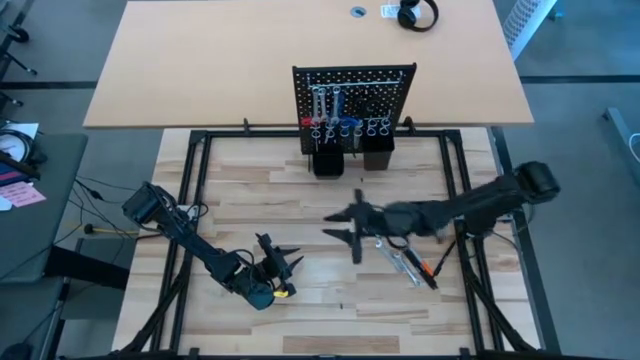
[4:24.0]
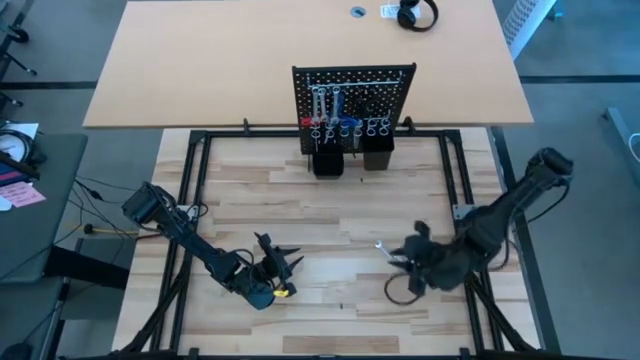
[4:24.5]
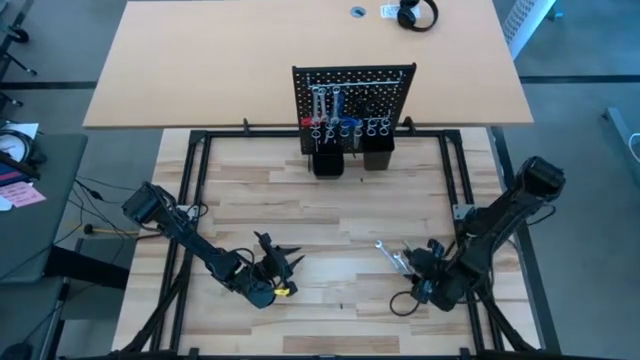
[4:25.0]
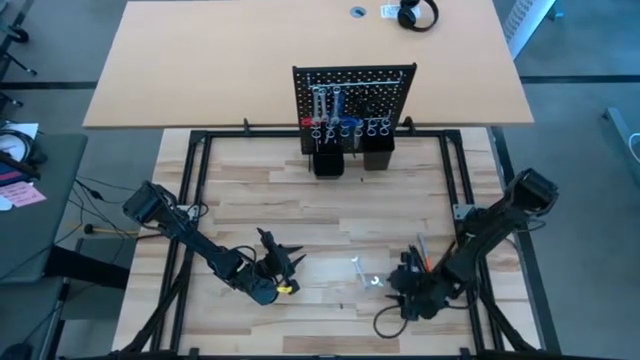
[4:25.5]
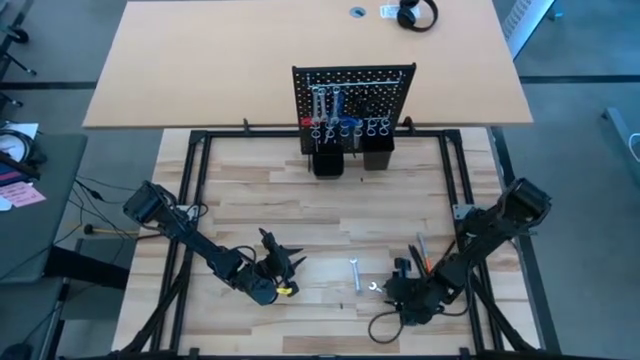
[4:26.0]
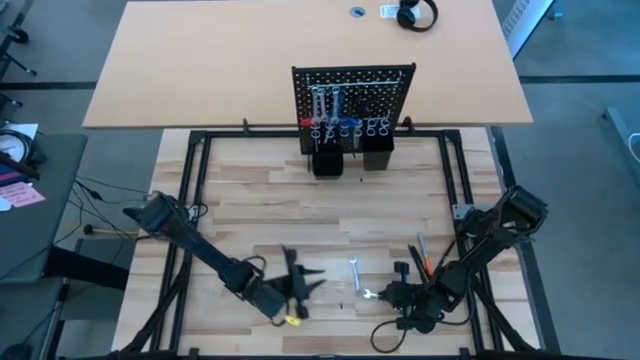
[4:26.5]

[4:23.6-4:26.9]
Task: Hang tools onto peg board
Hang the wrench on the pegboard

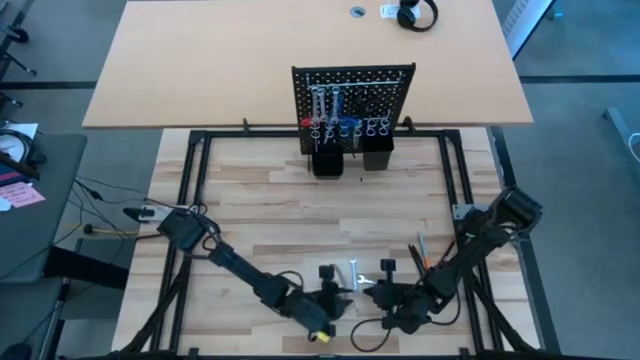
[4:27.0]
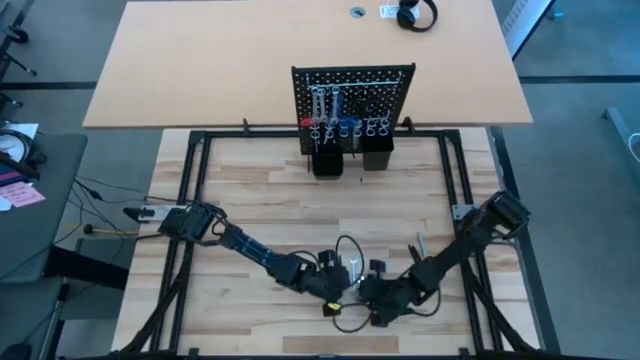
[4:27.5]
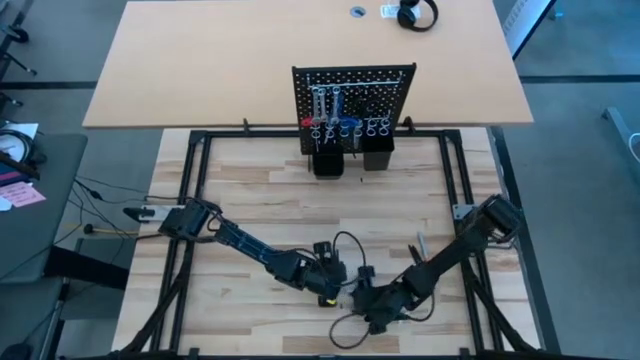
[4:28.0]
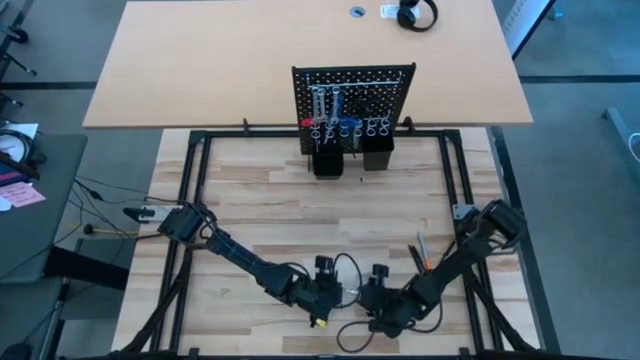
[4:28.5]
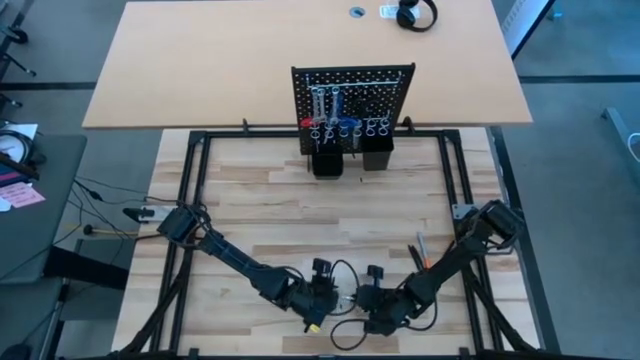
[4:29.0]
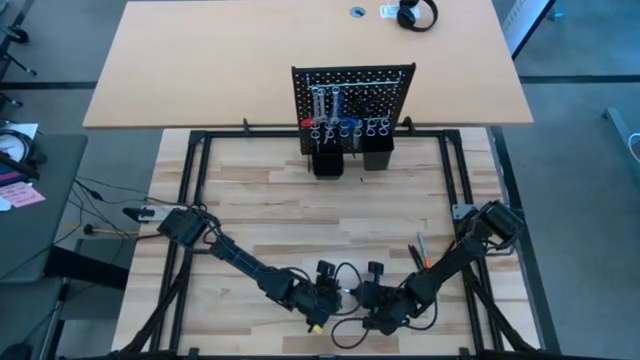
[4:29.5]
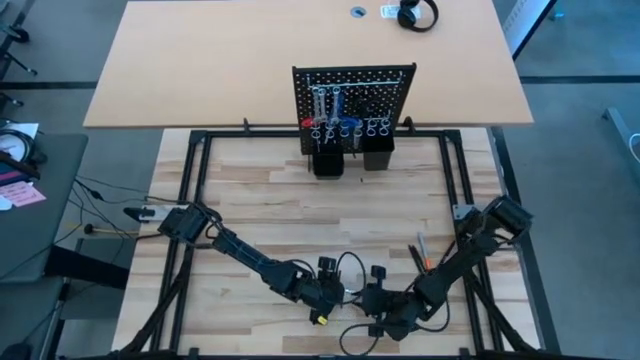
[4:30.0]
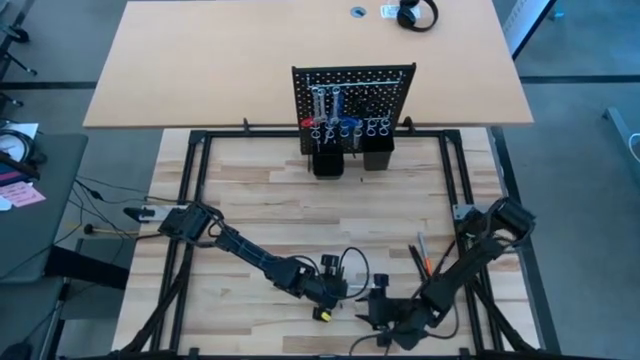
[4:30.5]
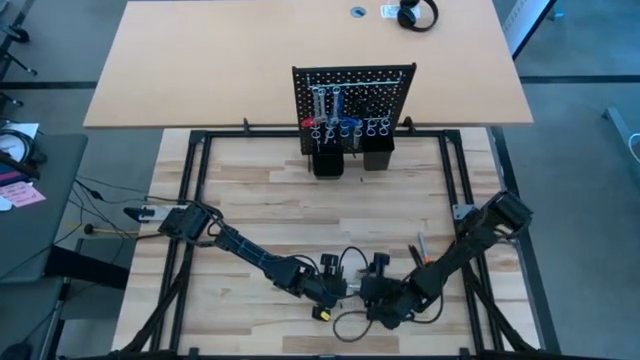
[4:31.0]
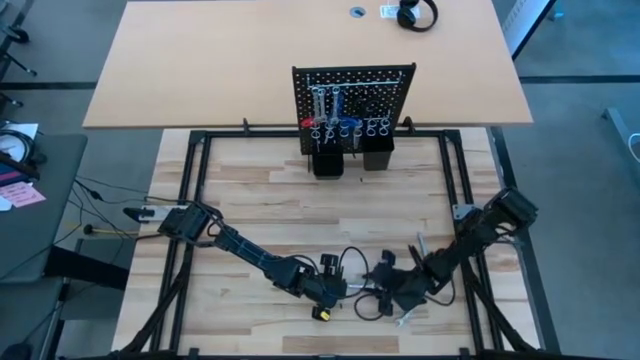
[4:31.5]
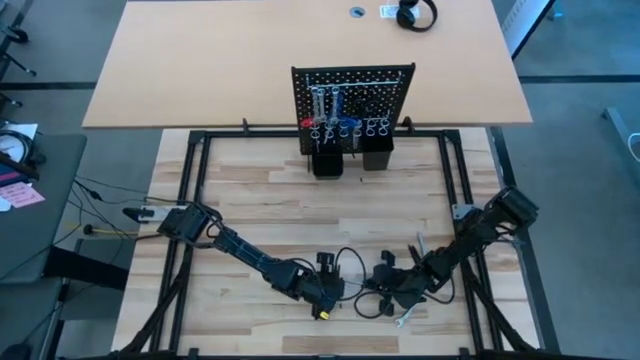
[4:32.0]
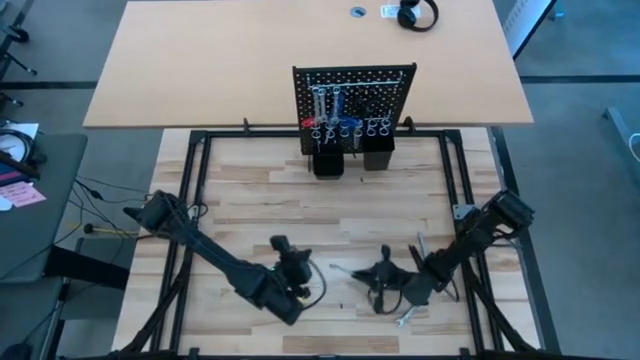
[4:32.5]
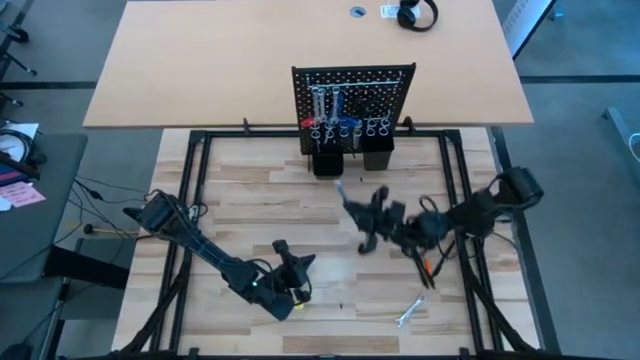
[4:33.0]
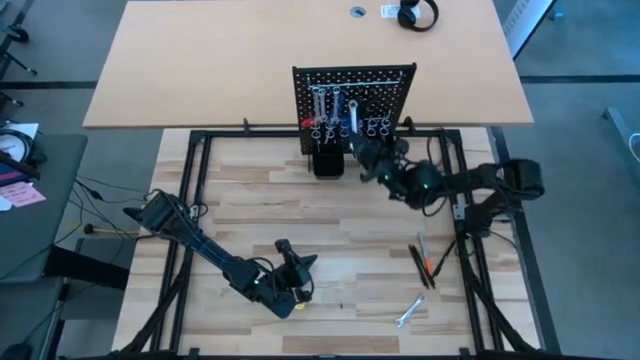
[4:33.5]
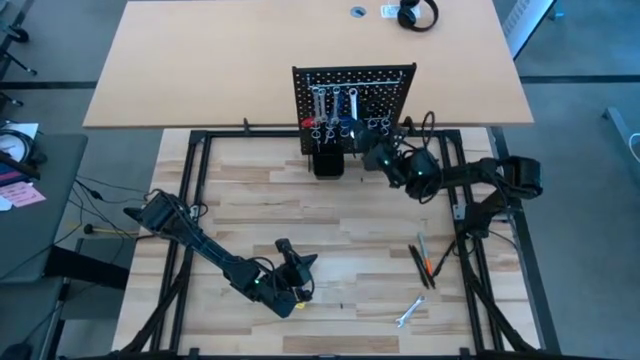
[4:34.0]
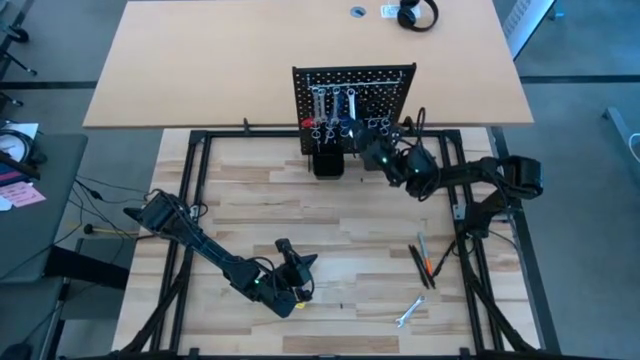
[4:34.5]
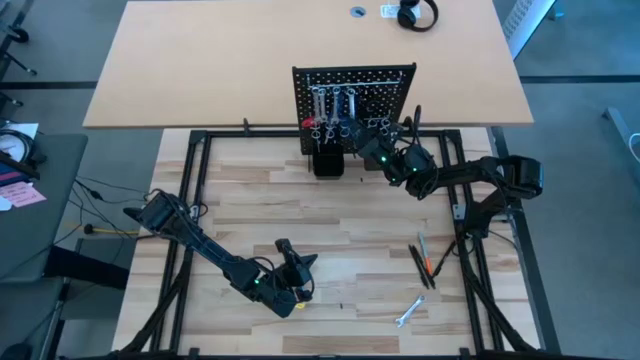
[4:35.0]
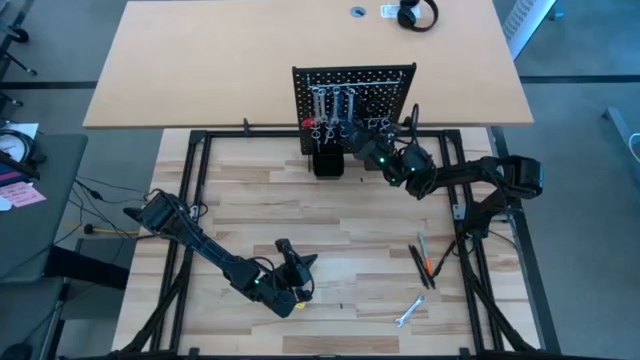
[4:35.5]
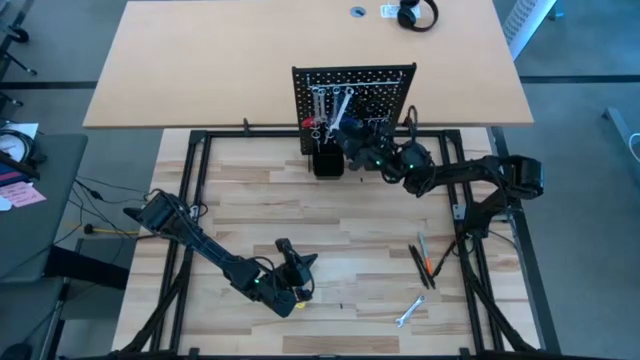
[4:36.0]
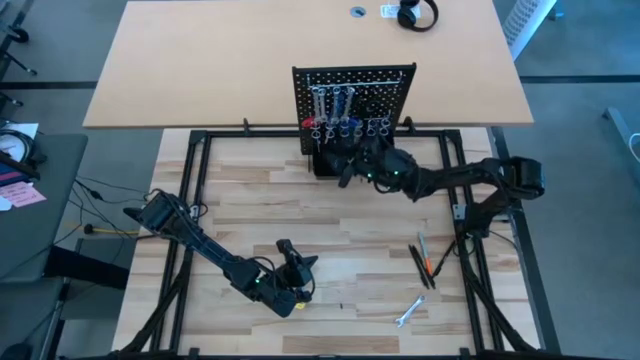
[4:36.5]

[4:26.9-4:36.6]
Hang the wrench on the pegboard

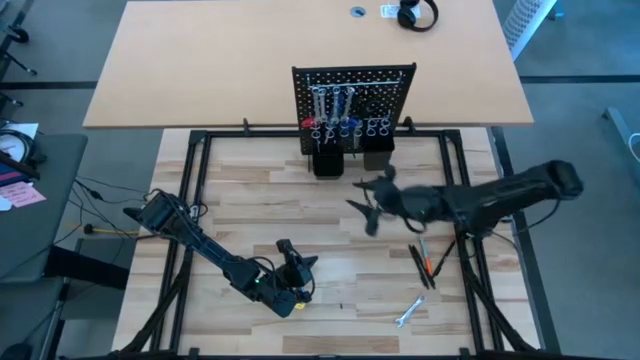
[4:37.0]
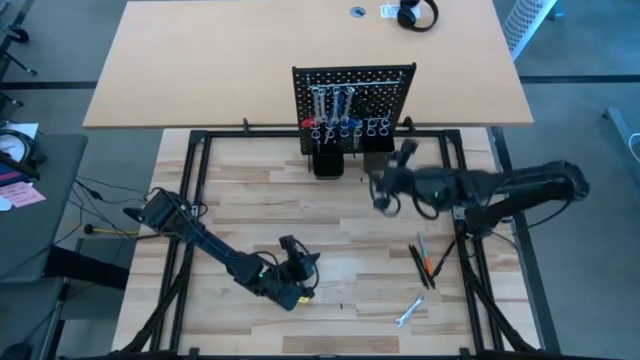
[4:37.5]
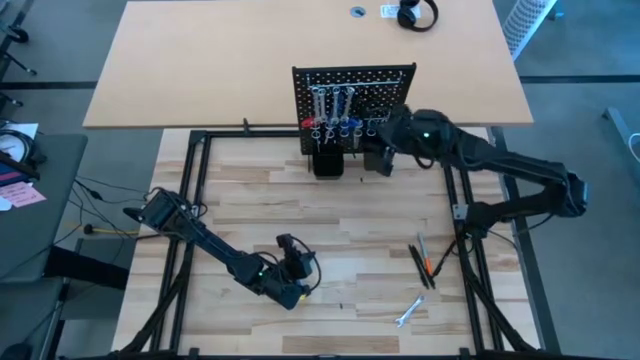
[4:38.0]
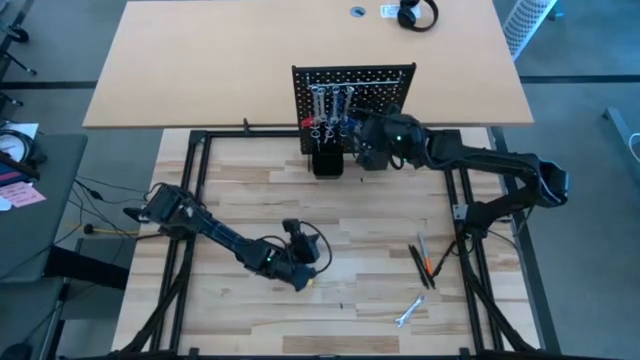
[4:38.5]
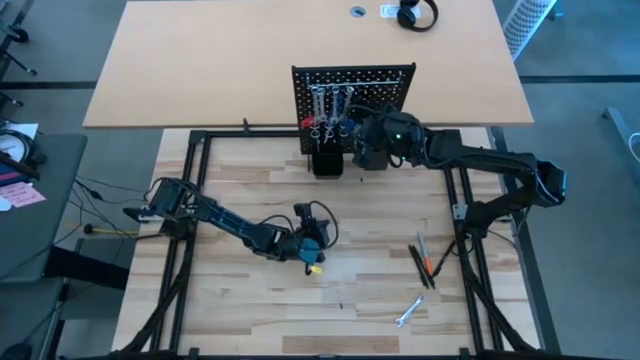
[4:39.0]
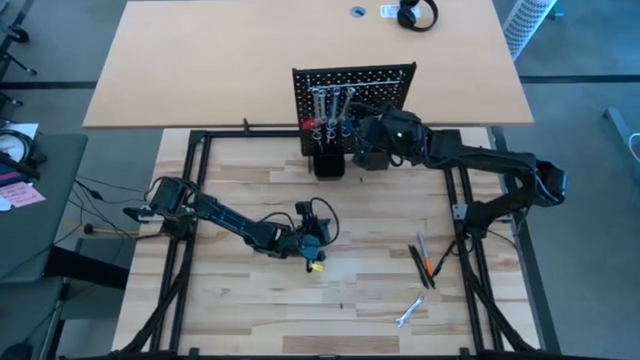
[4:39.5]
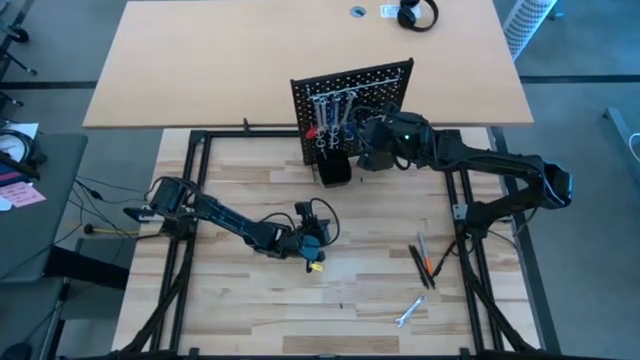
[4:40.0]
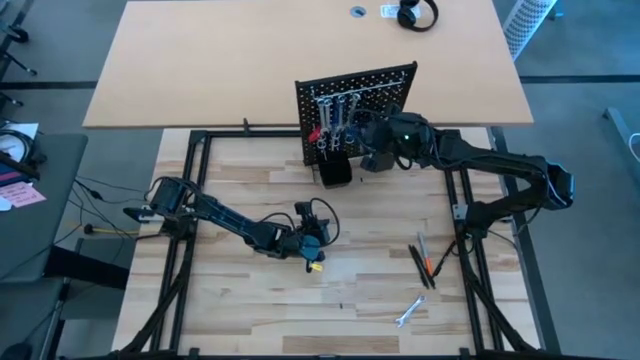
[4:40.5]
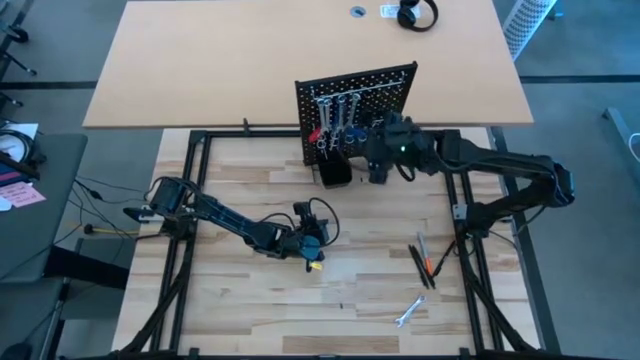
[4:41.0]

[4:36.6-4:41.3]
Adjust the blue hexagonal T handle wrench on the pegboard
